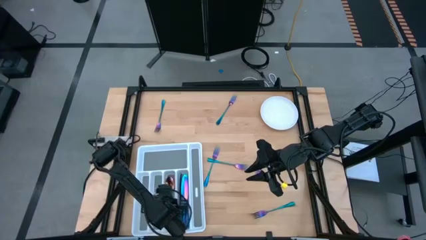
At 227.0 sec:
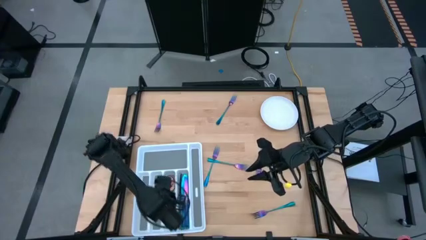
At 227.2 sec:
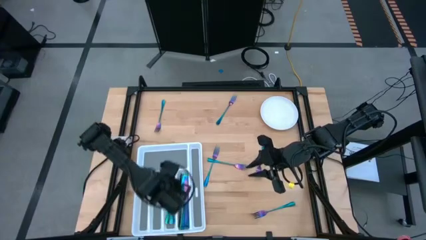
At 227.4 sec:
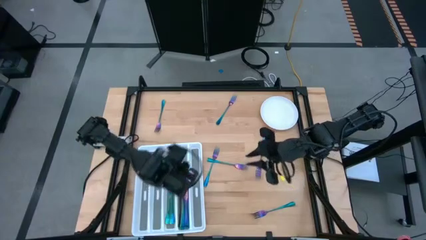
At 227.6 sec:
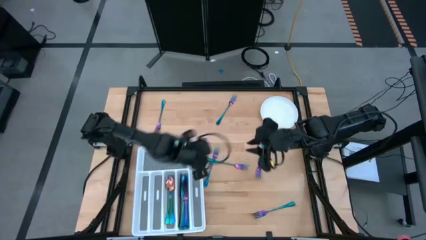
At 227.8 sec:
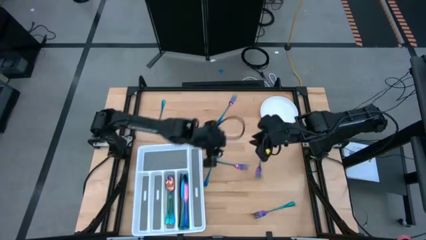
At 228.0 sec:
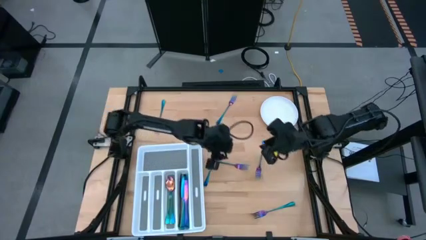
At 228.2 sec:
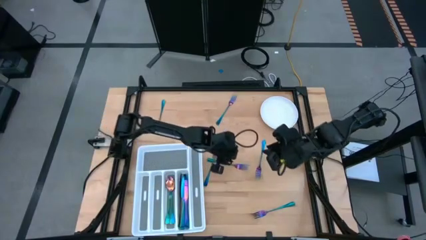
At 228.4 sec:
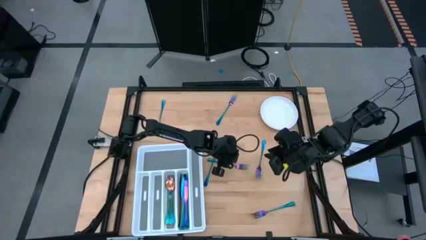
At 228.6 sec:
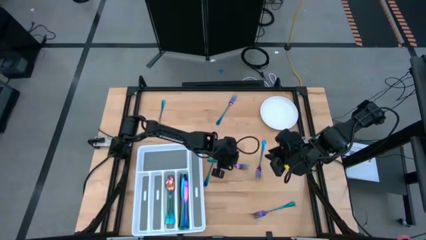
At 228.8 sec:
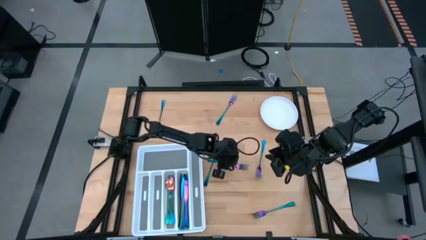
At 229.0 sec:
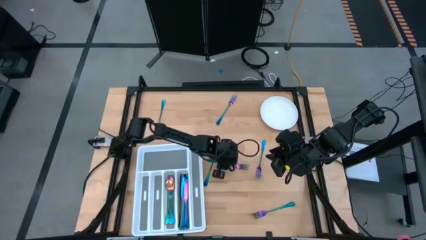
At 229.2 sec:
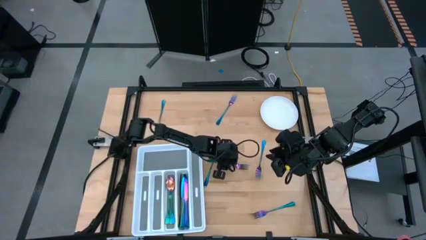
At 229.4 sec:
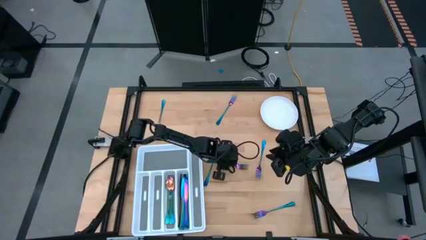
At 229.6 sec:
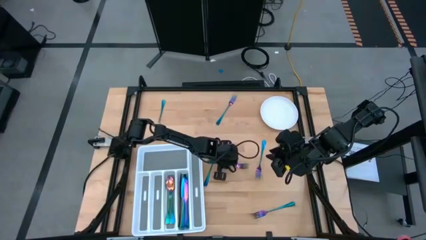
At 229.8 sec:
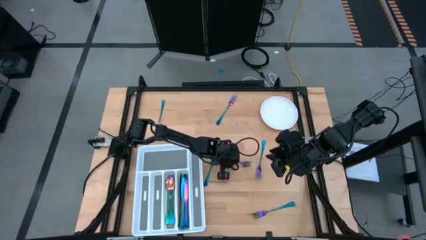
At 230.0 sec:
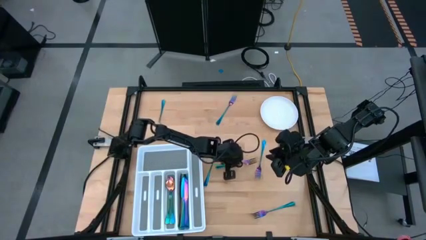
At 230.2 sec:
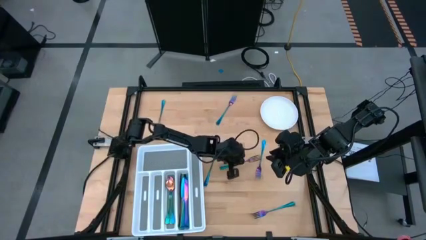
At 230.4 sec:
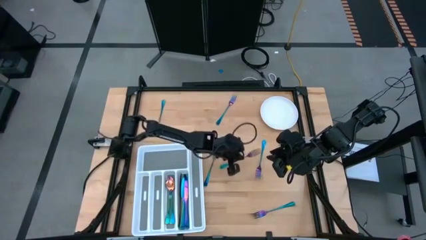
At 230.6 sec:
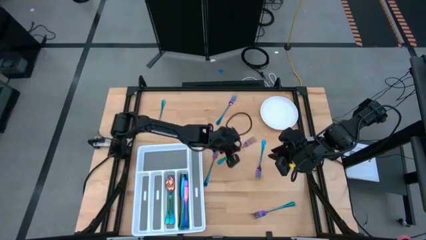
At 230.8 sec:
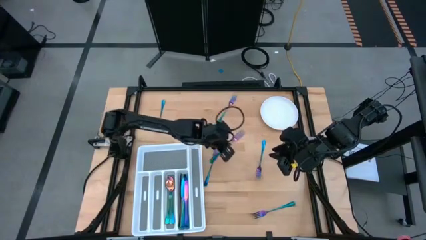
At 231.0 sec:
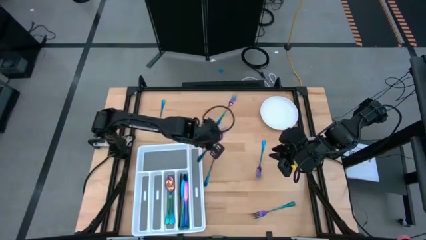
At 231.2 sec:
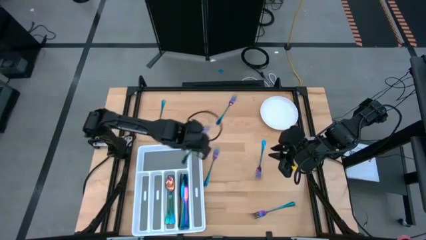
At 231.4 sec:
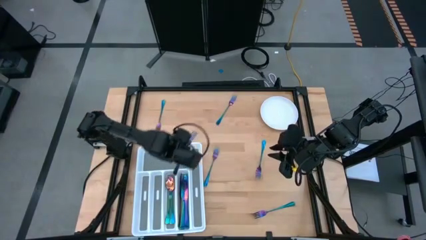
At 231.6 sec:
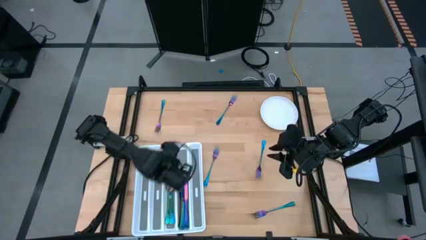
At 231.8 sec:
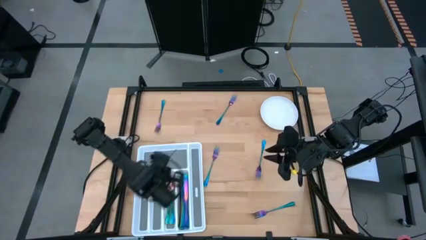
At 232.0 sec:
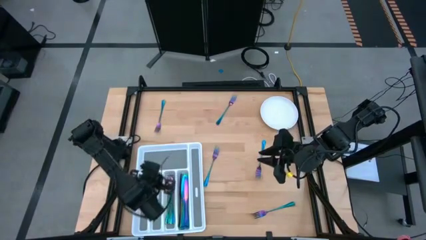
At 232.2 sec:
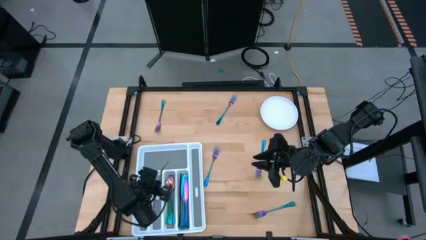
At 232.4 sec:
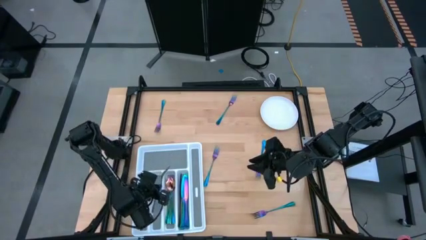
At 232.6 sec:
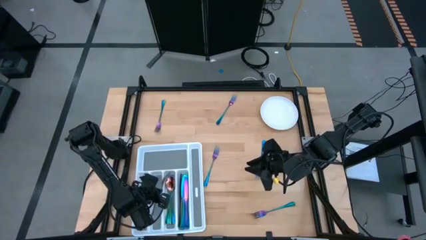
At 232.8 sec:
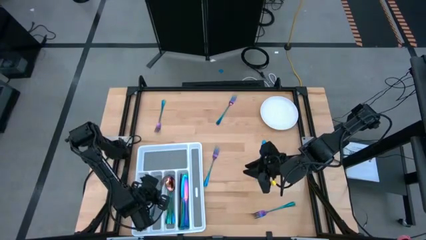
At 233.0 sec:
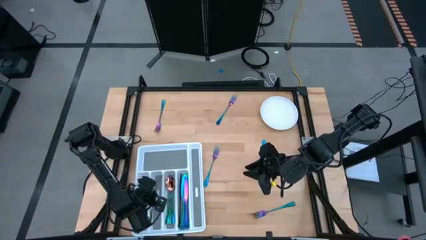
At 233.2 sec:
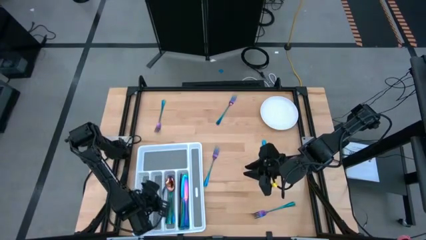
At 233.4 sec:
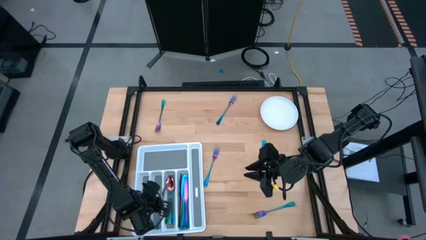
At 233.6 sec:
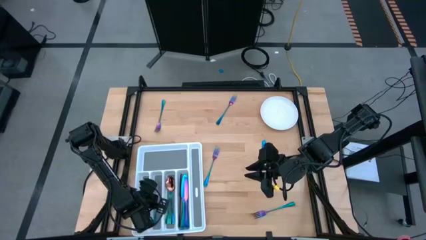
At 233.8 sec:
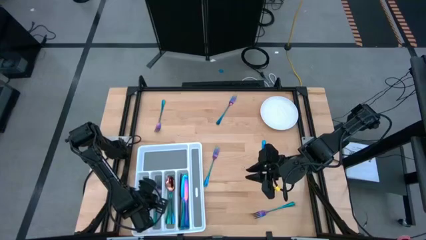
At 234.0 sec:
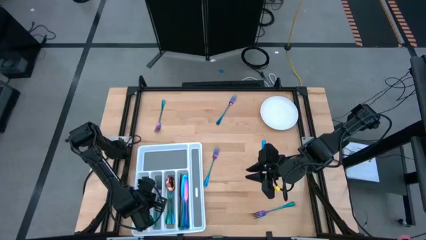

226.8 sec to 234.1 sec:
Task: Sort silverware
Put the middle iridescent fork into the cutlery tray

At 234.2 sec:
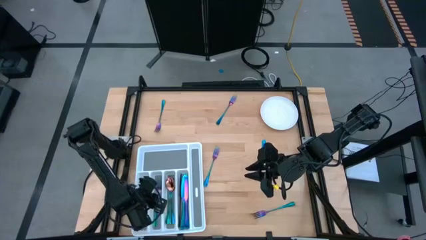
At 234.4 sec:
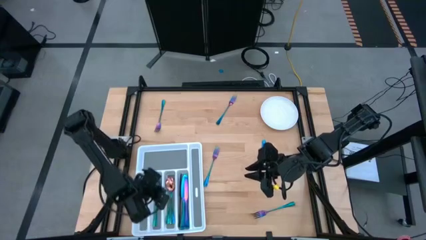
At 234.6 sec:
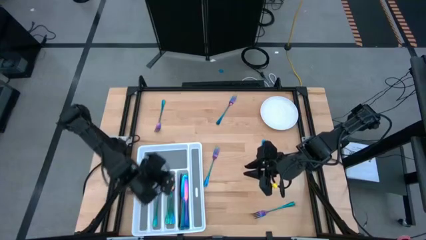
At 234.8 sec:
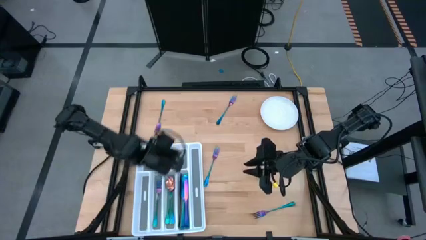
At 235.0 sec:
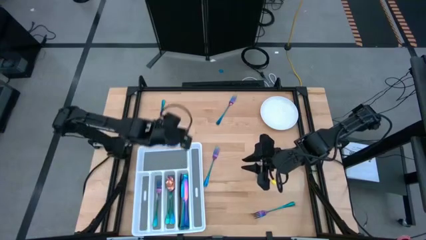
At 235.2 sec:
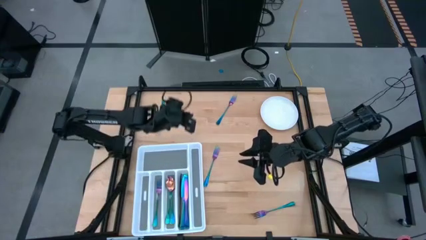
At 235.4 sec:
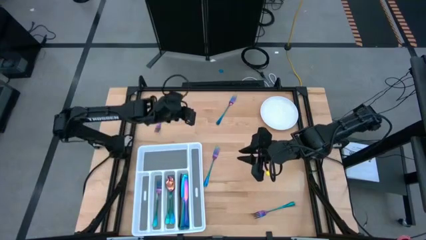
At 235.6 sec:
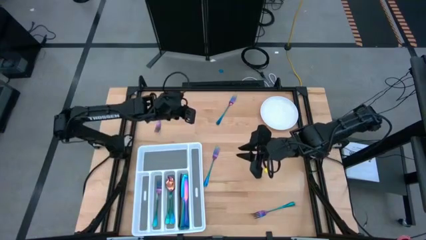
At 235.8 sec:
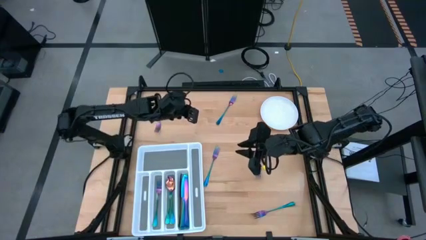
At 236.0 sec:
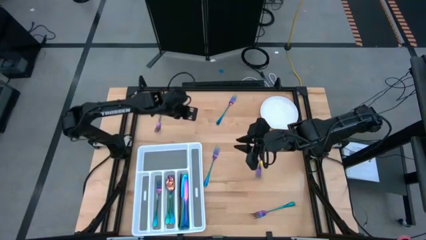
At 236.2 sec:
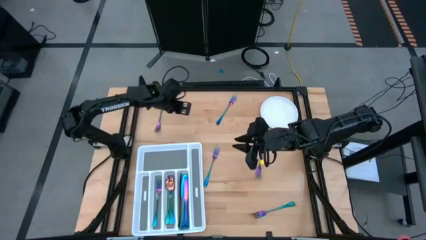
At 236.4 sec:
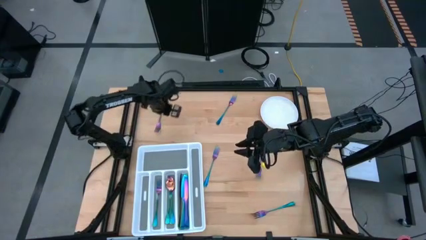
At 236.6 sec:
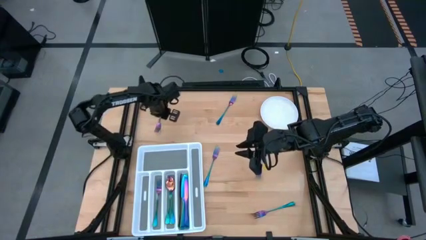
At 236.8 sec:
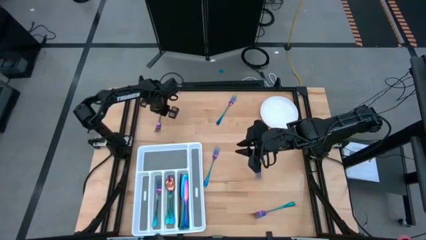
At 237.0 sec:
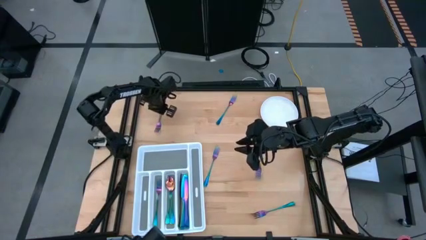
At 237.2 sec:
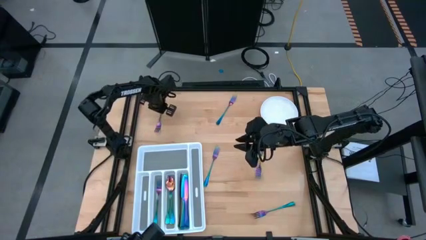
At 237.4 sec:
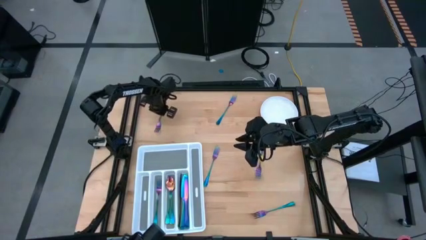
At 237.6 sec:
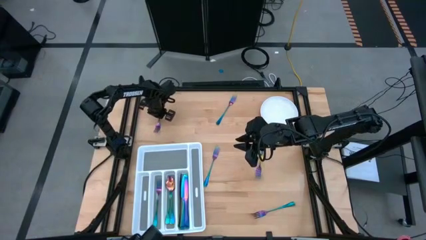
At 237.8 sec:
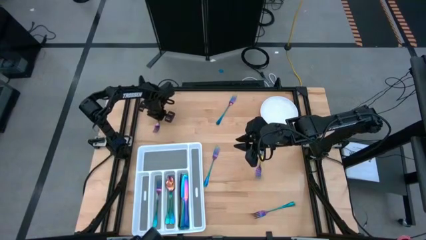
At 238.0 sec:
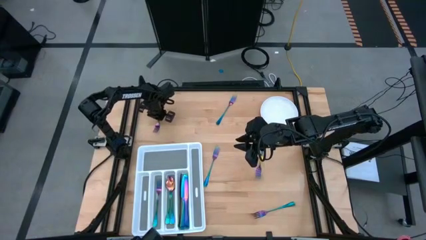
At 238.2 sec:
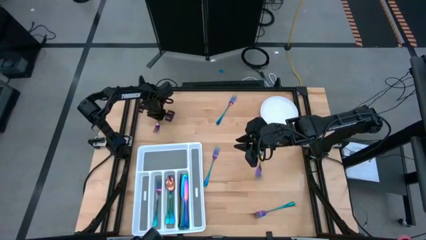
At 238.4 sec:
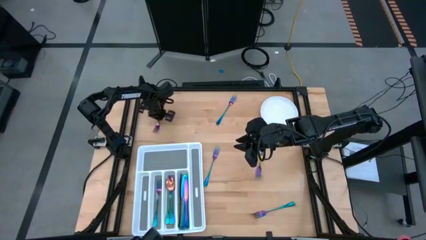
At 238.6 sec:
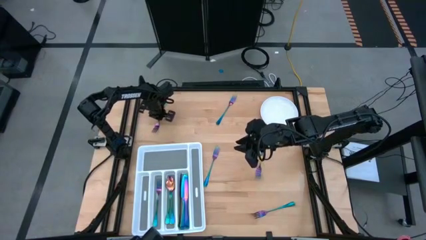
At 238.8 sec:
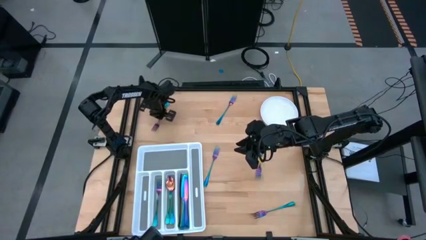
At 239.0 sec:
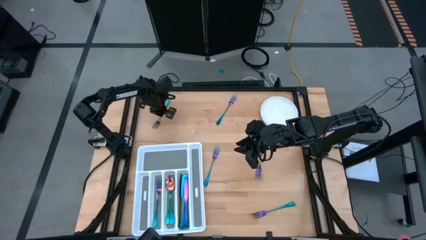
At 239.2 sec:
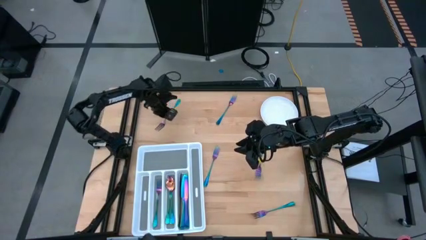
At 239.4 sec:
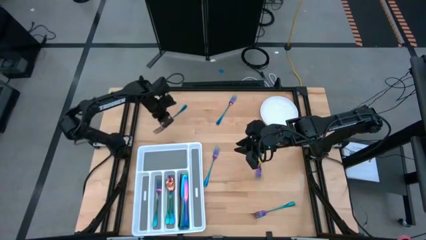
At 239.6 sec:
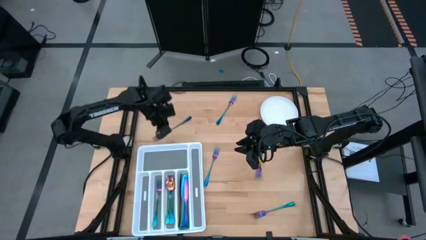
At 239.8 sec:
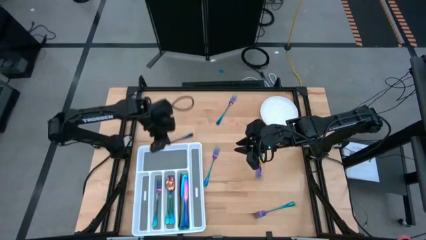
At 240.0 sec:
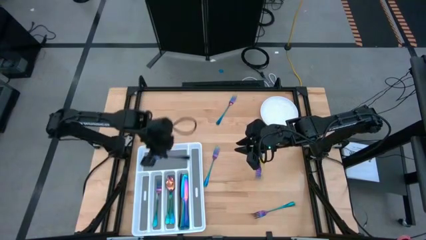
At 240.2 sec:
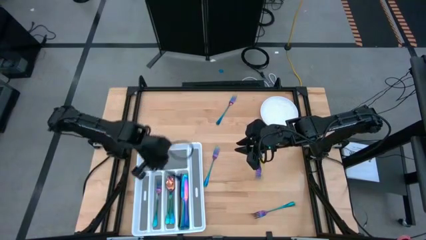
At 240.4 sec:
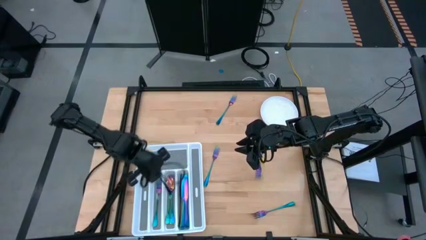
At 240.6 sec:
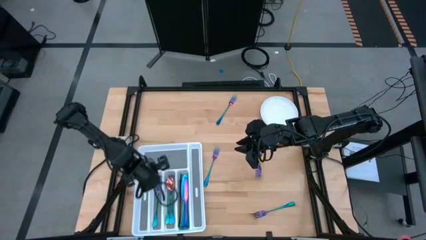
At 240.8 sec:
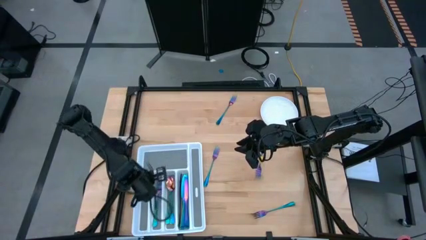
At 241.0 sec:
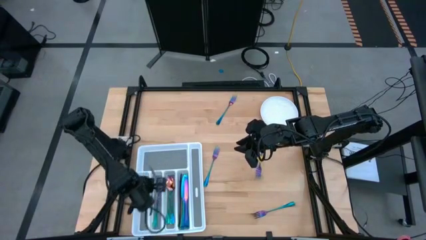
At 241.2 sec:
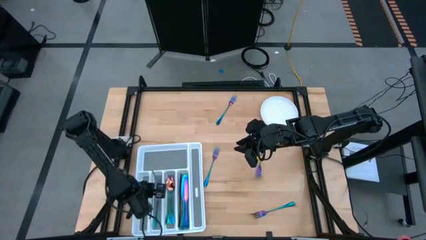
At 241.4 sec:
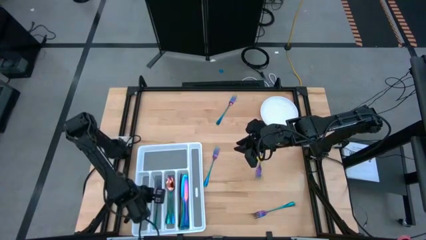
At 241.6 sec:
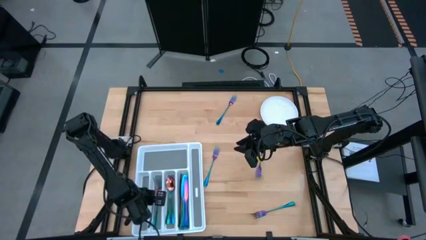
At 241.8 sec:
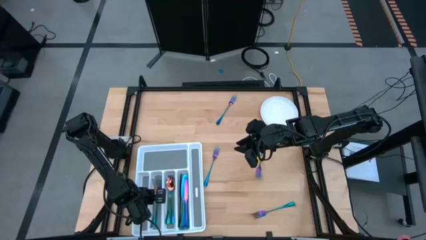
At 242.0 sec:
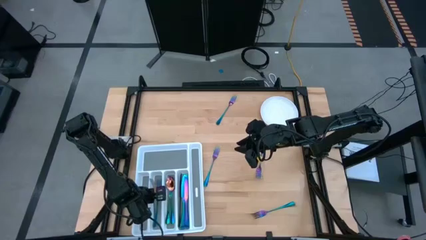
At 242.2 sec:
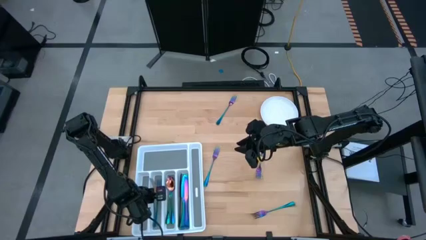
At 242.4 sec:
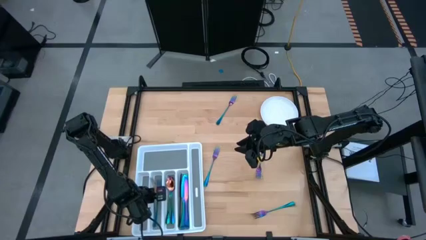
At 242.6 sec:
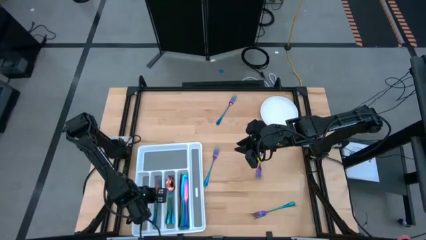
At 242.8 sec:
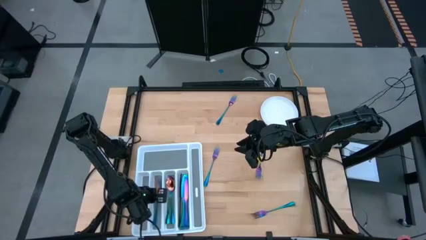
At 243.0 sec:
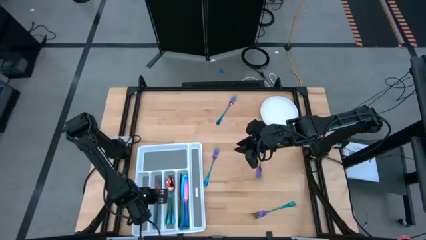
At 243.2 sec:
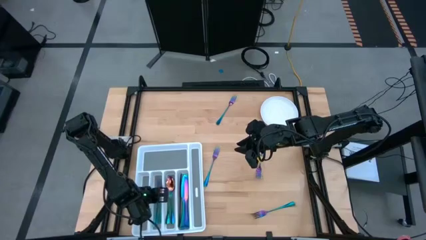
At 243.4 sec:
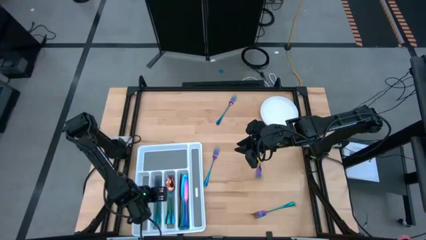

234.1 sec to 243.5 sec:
Put the top left iridescent fork into the cutlery tray
